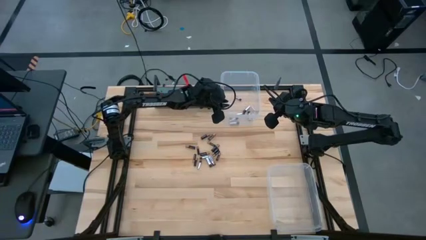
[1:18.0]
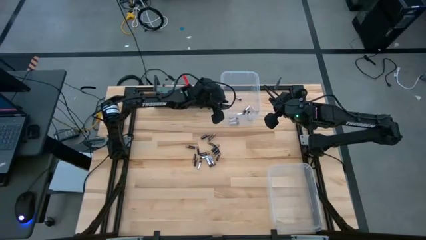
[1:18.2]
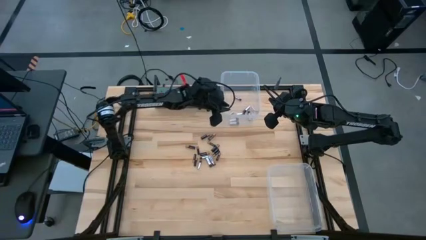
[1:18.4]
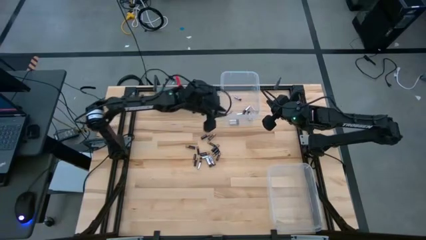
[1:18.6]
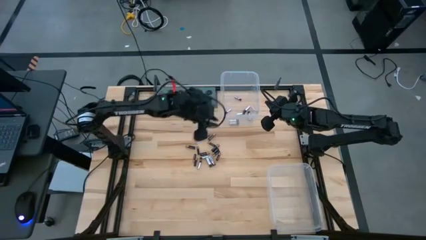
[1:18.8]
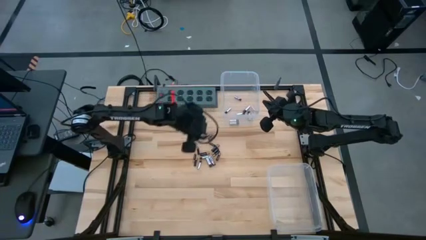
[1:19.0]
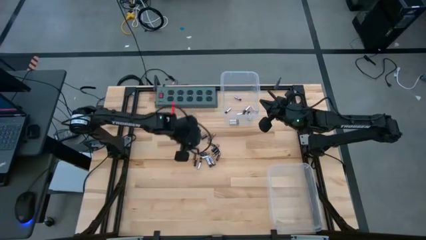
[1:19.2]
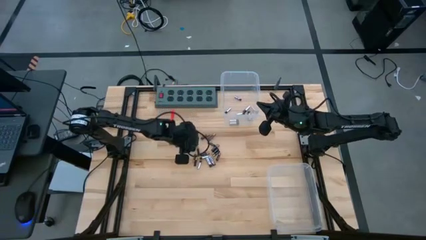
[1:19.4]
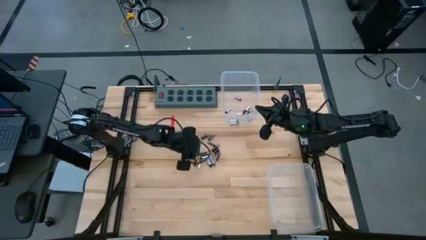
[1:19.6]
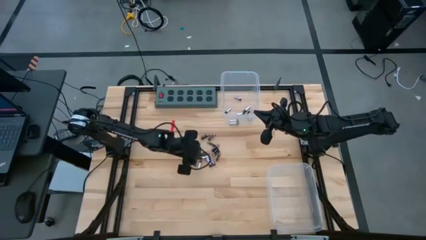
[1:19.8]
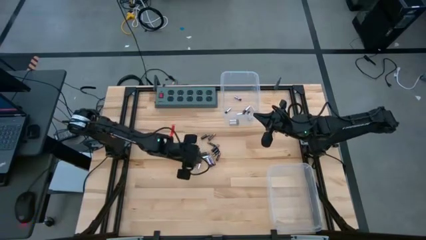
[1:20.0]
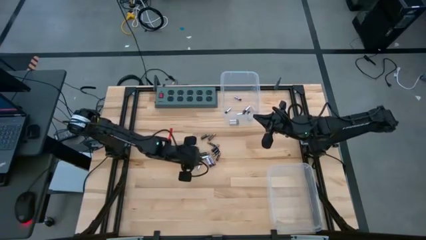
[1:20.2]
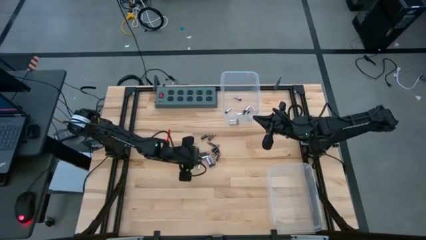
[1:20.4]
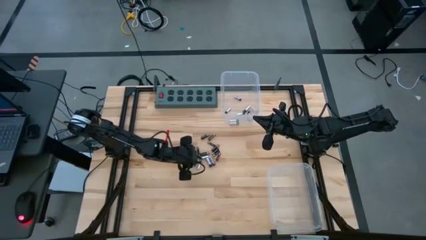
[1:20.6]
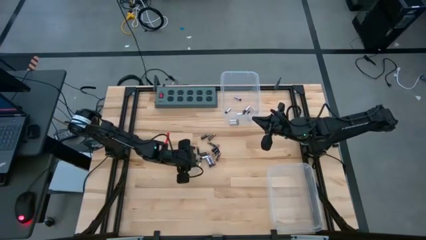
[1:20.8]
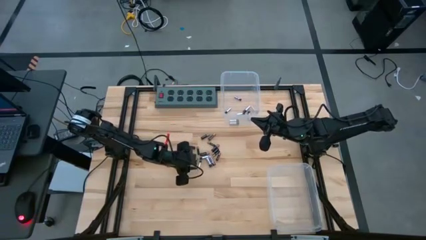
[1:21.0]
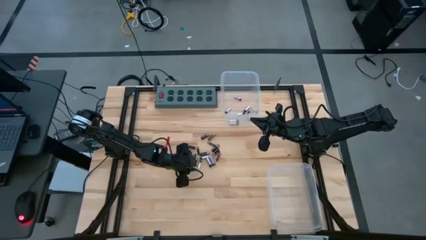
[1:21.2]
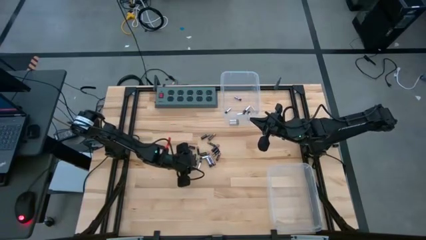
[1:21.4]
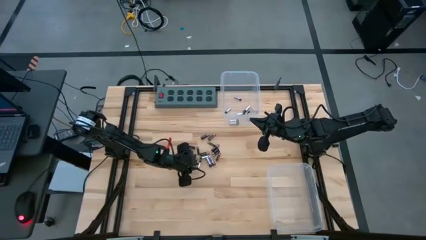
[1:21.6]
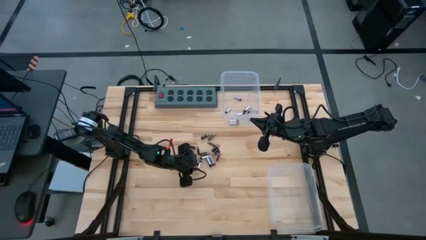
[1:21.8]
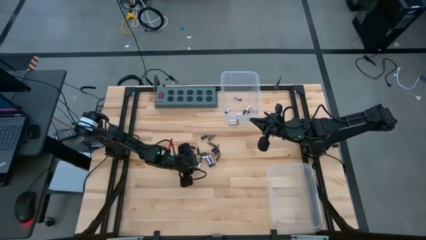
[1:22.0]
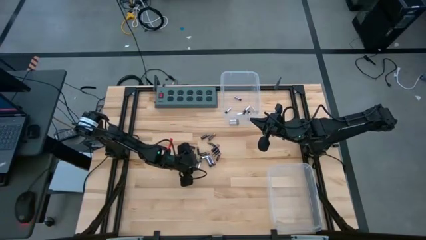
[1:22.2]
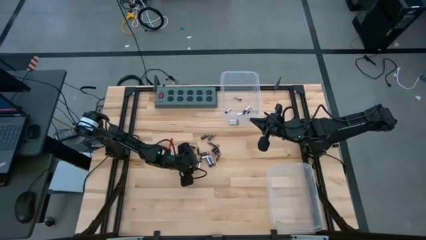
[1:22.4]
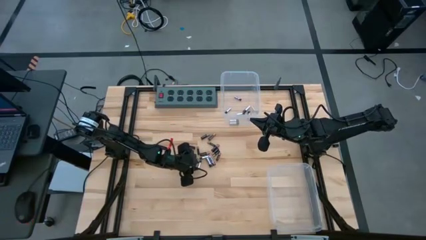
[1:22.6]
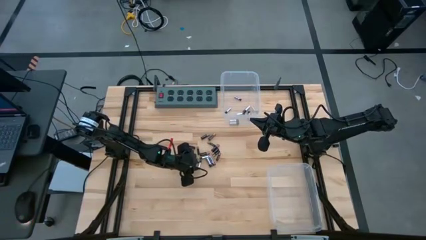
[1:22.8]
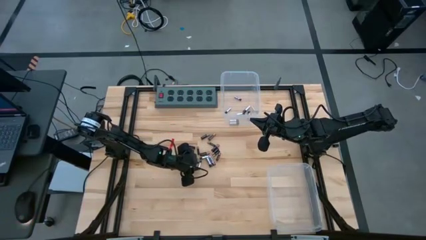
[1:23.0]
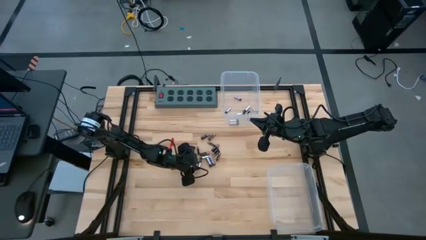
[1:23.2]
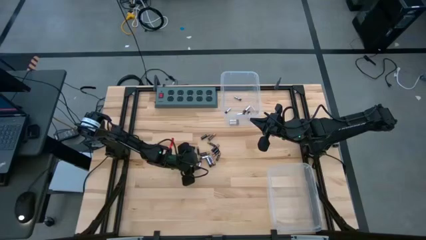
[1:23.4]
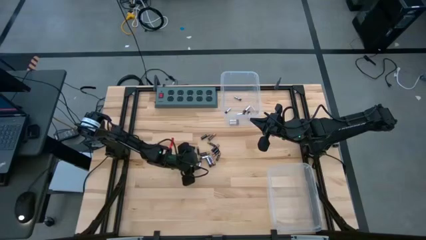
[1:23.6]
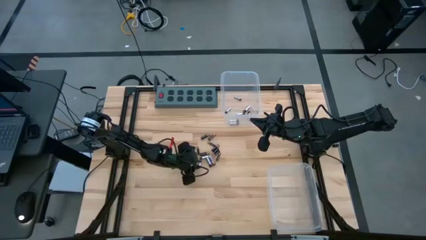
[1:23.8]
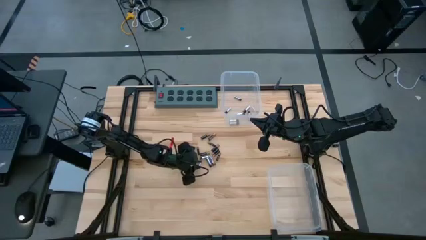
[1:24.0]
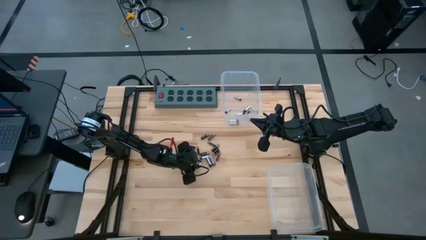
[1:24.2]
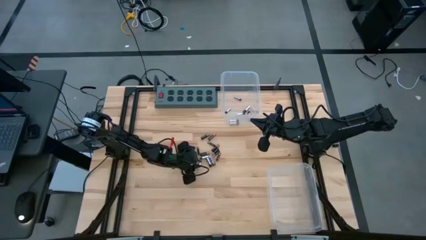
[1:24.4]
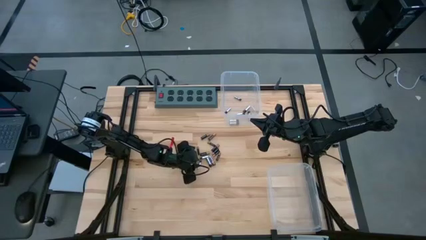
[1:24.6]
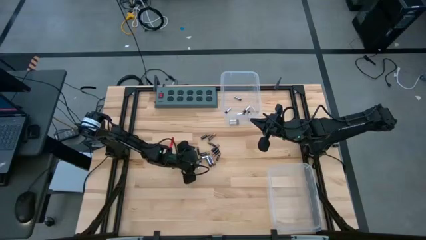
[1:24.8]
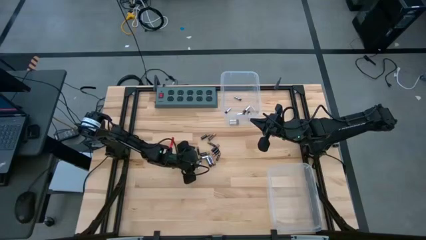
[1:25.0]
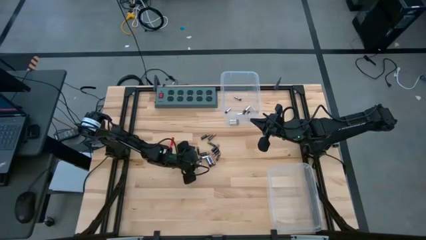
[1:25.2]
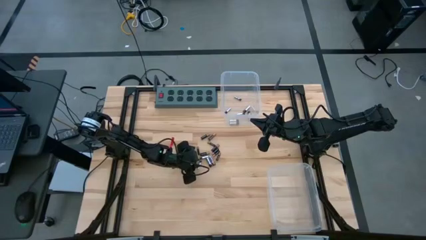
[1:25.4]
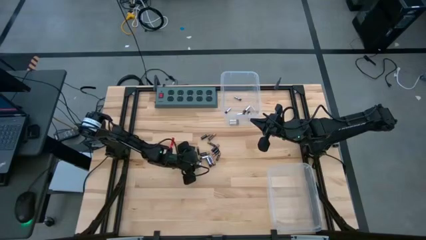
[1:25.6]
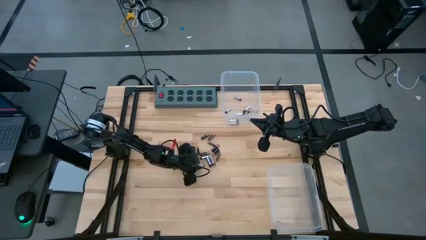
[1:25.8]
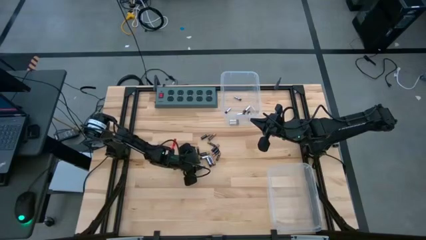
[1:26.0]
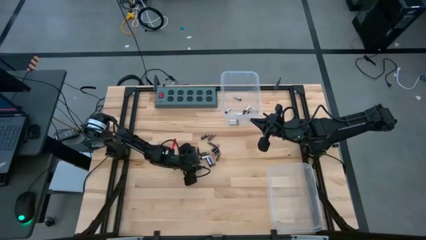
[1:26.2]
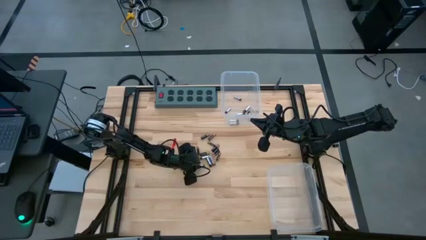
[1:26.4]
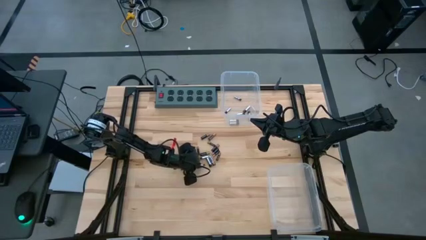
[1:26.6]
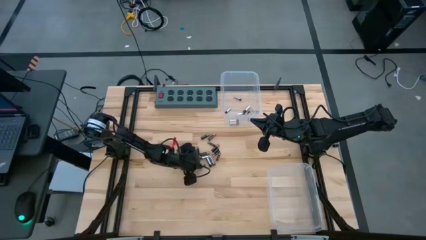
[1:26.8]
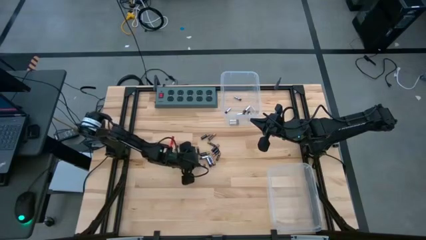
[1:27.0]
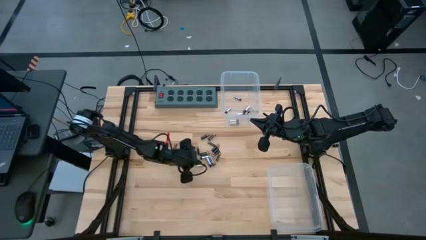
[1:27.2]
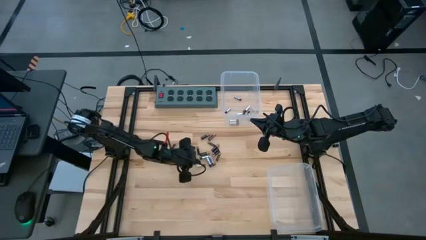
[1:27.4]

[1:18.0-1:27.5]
Task: Sort batteries
Put the silver battery into the top transparent bin

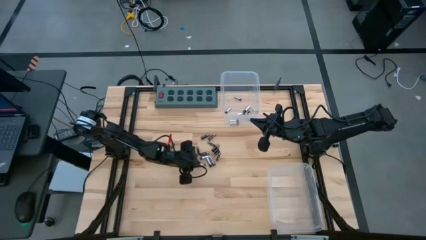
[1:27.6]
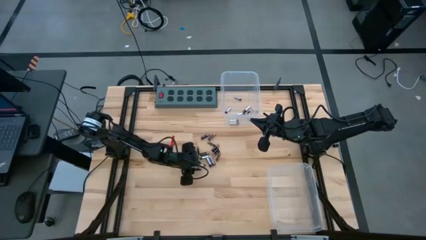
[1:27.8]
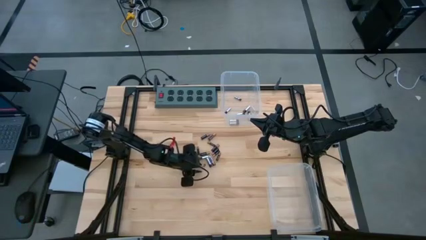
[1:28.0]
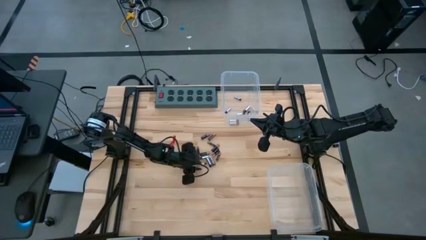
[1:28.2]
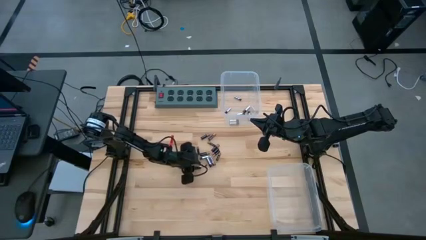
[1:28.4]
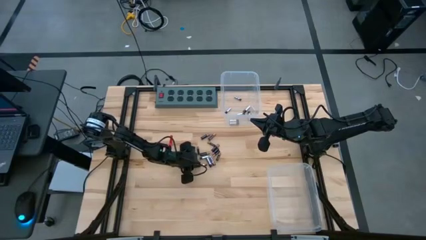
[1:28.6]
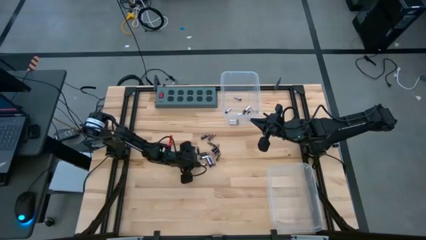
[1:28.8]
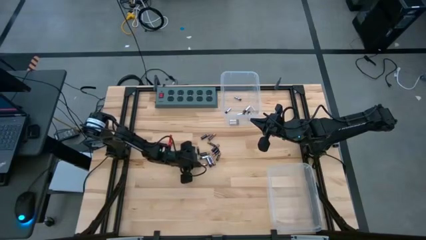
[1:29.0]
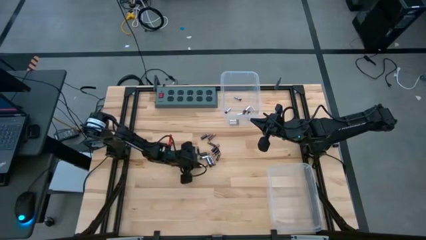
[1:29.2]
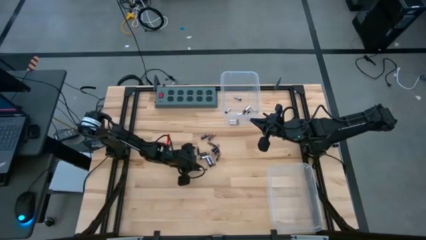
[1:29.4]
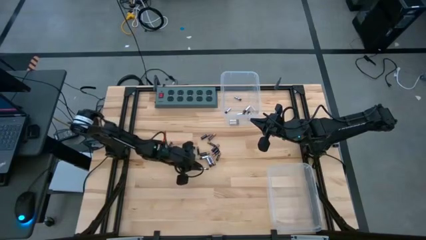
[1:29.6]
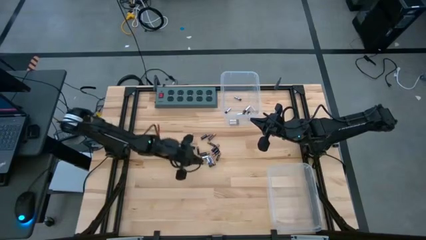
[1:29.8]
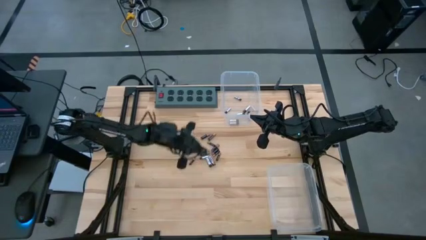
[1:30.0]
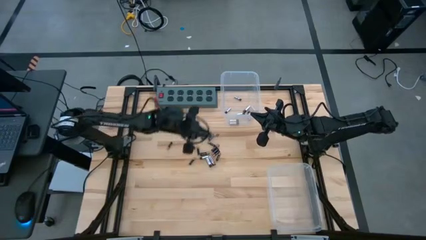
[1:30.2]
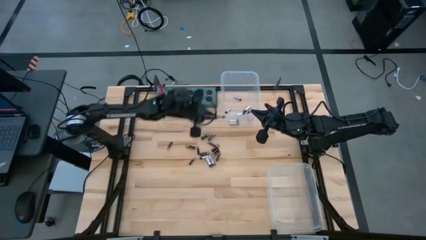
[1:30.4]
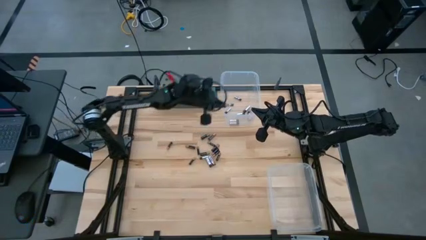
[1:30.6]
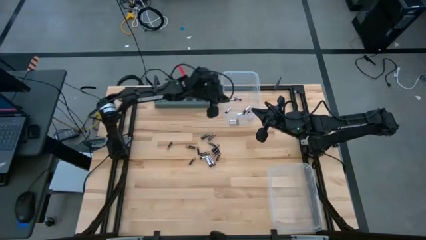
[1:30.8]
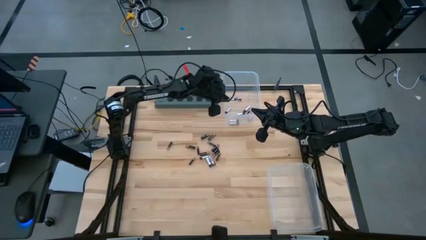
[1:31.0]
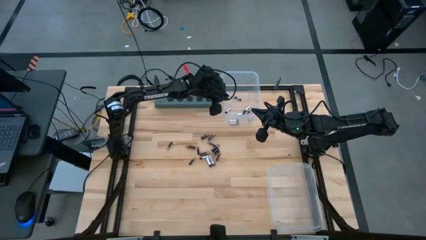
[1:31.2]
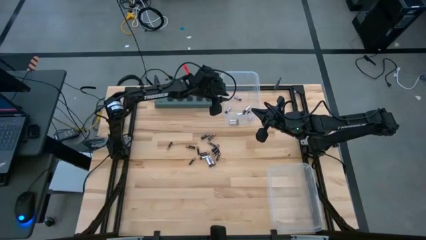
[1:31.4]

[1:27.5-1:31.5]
Put the silver battery into the top transparent bin

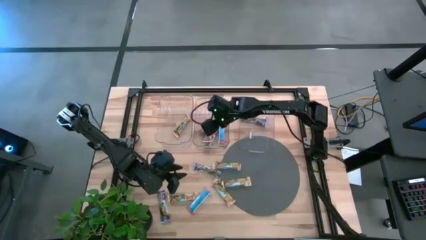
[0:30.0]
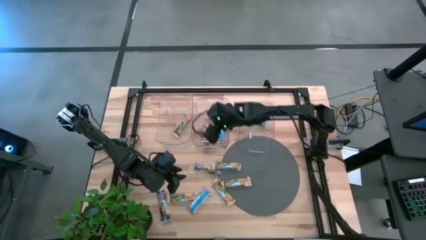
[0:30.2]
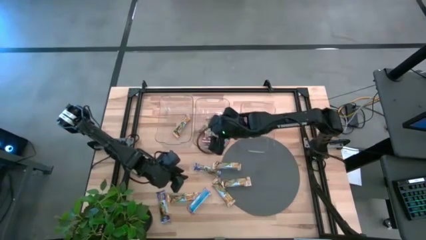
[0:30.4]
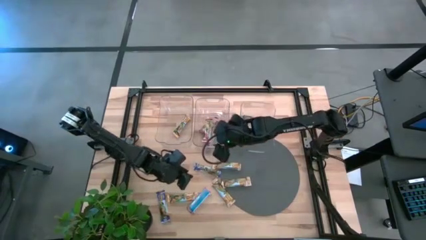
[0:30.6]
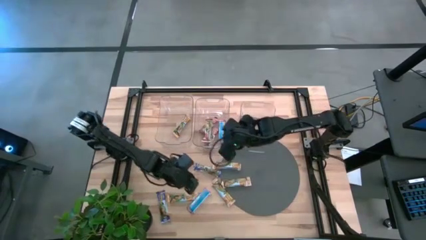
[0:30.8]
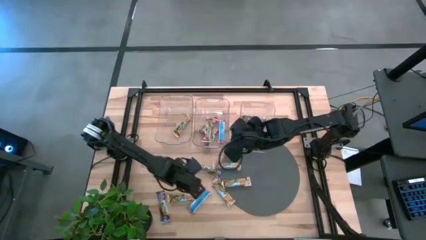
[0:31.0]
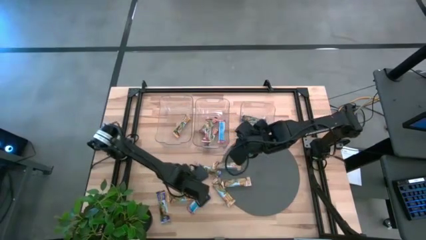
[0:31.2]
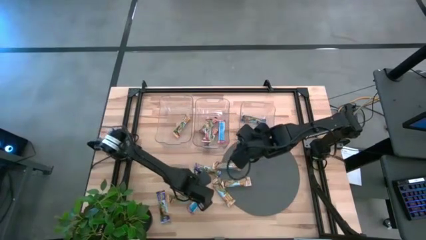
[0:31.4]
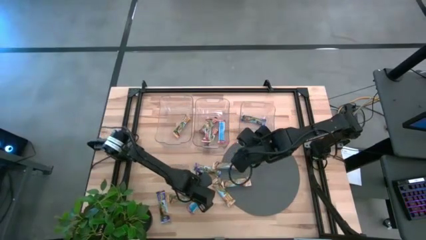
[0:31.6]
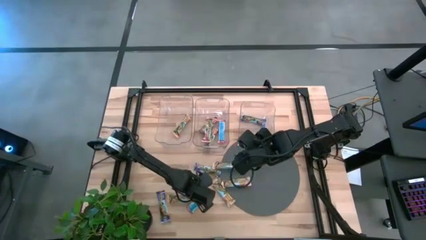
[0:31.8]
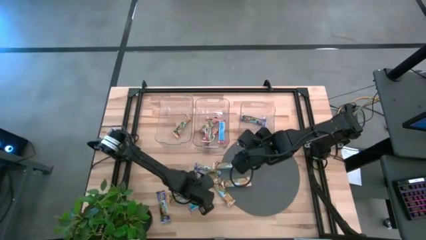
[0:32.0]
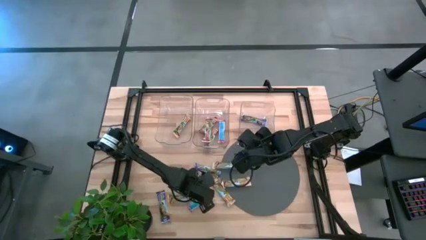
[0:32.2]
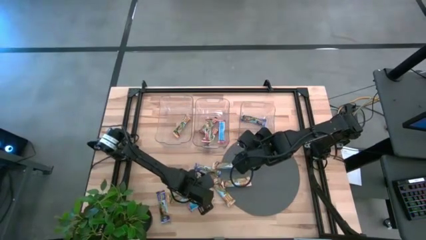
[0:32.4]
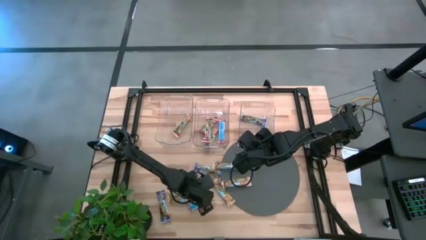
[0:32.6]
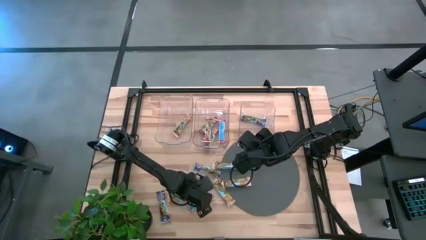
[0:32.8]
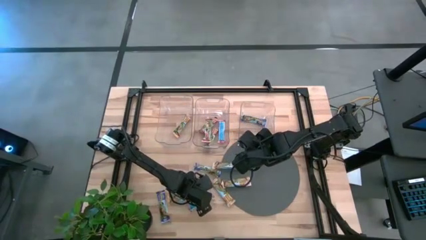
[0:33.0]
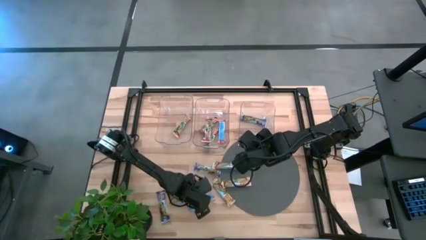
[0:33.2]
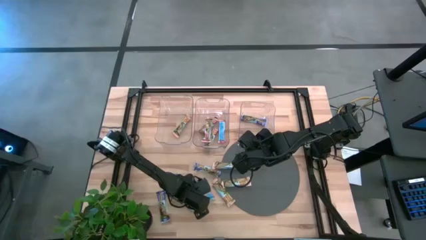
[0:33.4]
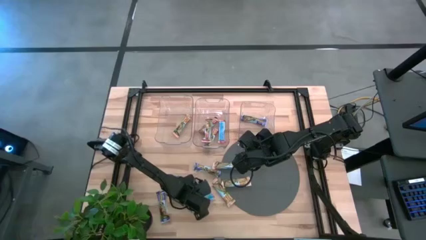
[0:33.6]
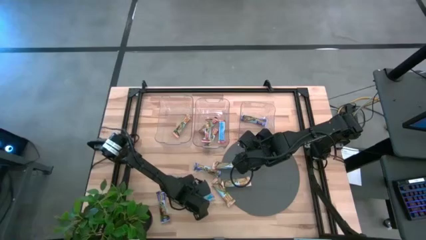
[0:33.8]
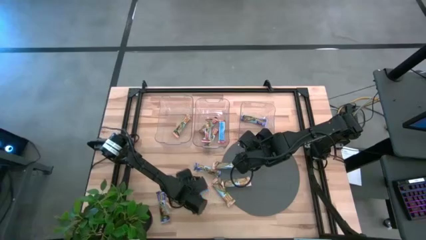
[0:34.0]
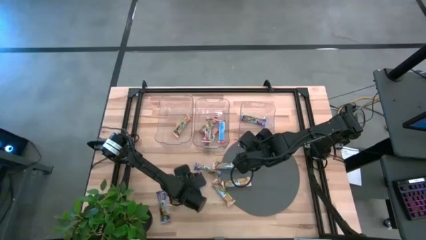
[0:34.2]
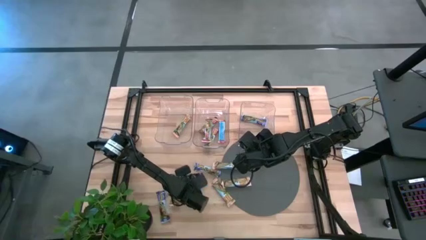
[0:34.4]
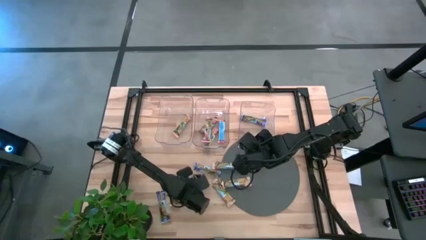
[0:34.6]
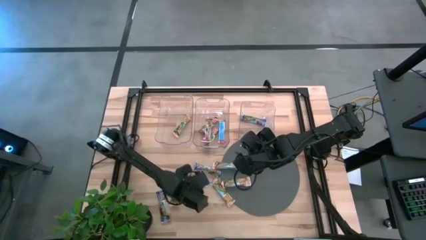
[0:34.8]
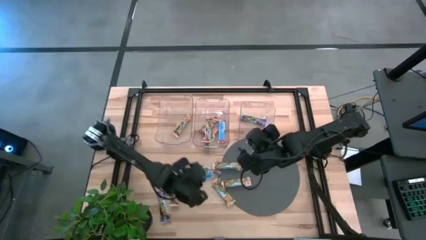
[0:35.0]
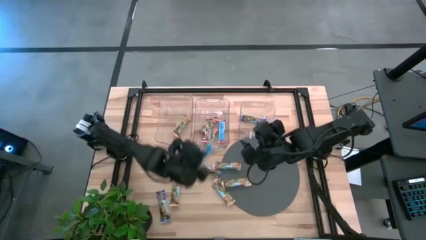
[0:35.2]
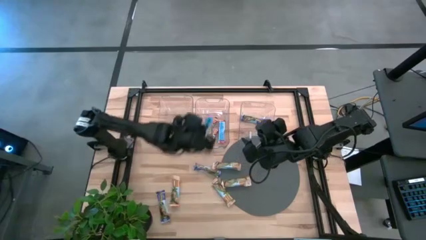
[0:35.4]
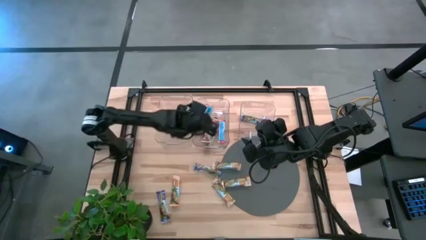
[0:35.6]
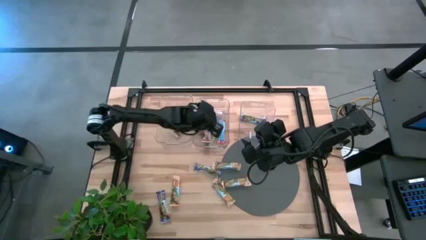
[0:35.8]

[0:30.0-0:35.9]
Task: Pick and place Granola Bars by type
Put the red granola bar into the middle transparent bin
